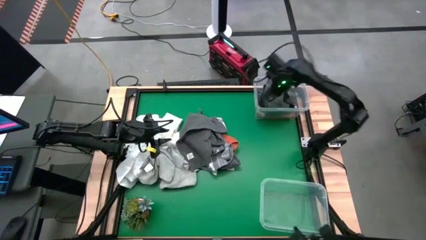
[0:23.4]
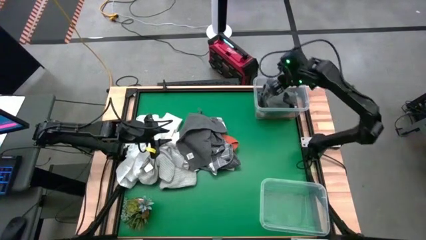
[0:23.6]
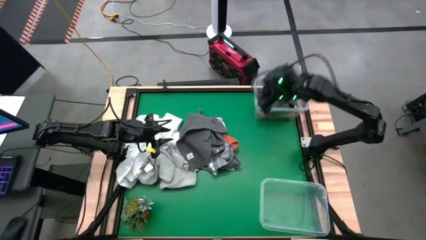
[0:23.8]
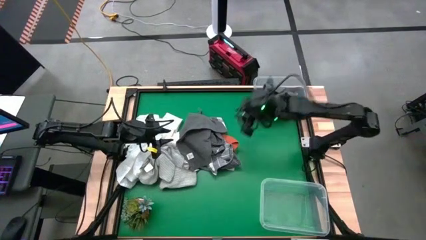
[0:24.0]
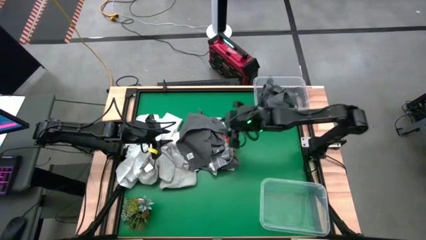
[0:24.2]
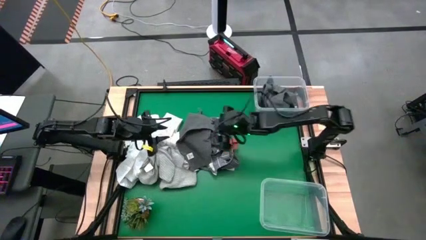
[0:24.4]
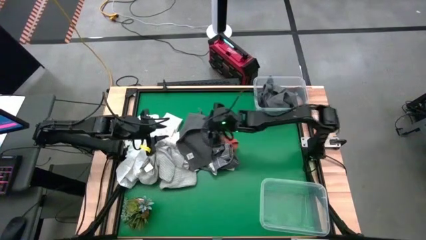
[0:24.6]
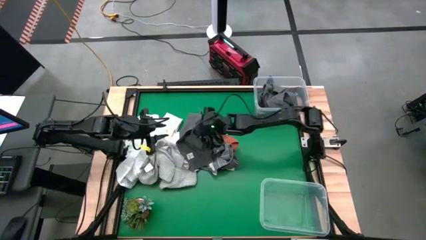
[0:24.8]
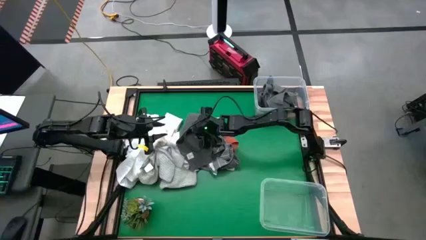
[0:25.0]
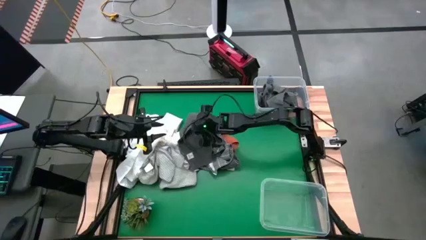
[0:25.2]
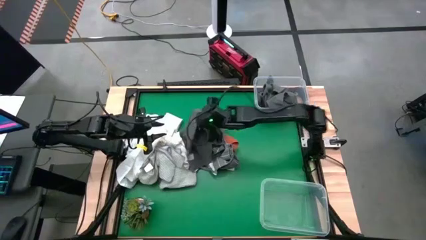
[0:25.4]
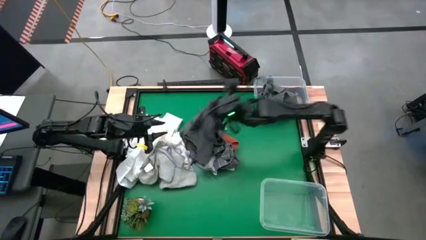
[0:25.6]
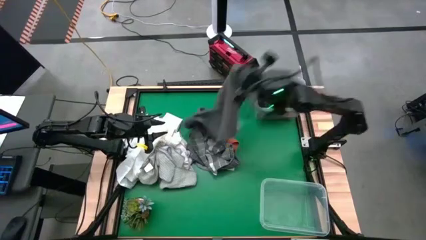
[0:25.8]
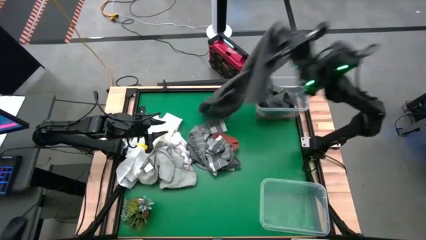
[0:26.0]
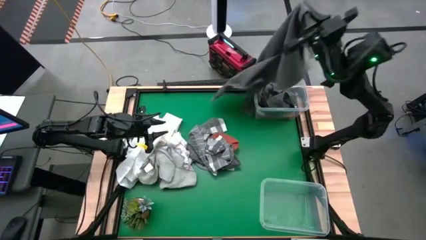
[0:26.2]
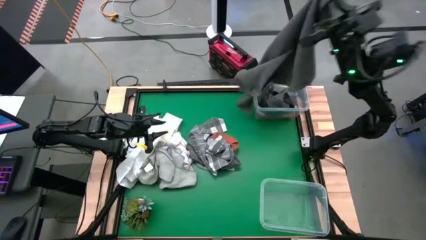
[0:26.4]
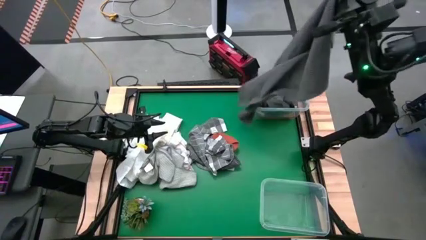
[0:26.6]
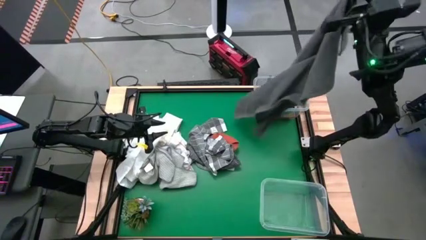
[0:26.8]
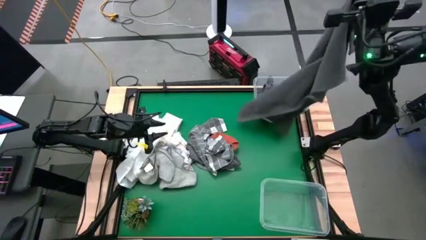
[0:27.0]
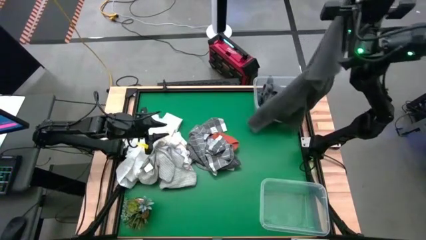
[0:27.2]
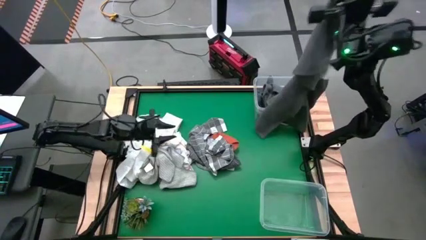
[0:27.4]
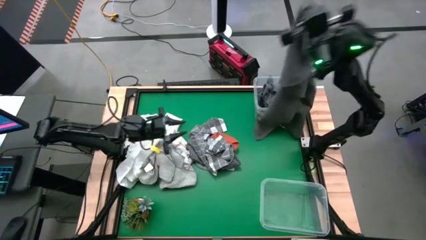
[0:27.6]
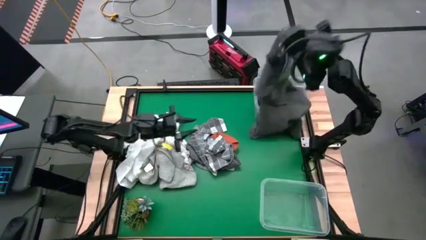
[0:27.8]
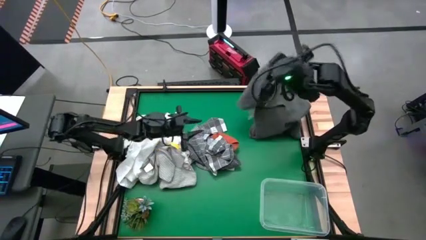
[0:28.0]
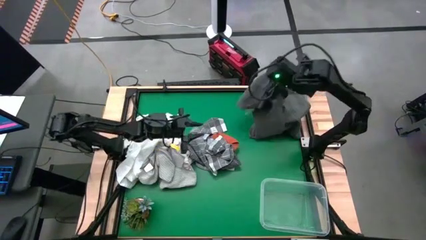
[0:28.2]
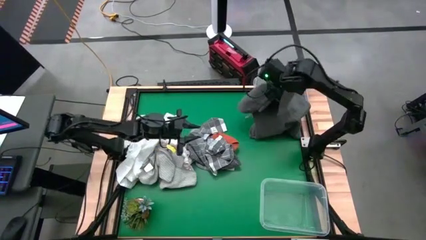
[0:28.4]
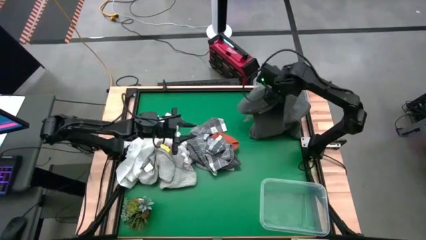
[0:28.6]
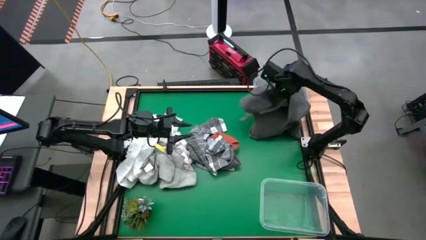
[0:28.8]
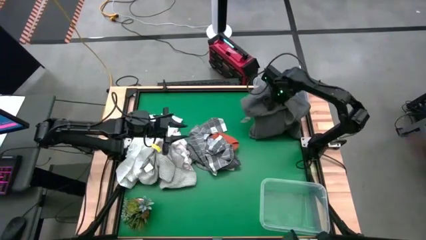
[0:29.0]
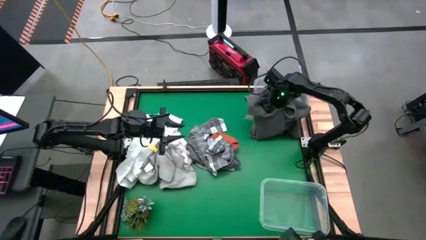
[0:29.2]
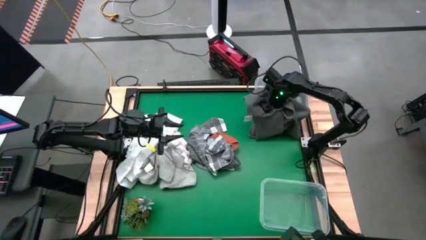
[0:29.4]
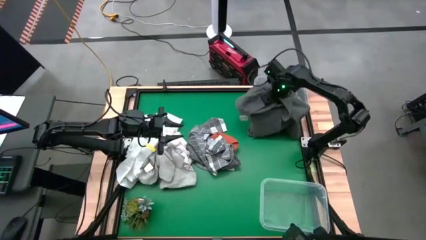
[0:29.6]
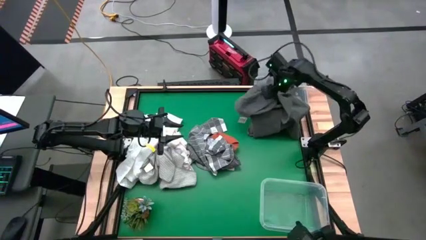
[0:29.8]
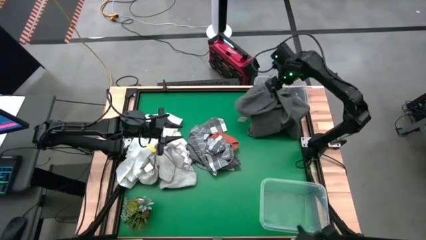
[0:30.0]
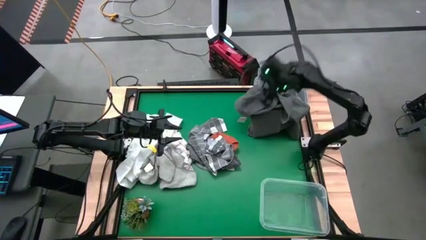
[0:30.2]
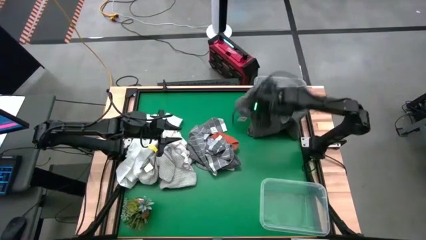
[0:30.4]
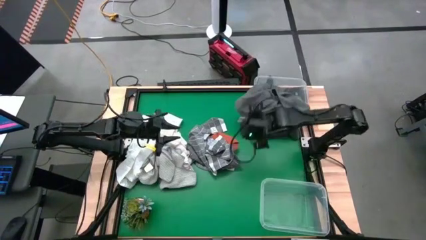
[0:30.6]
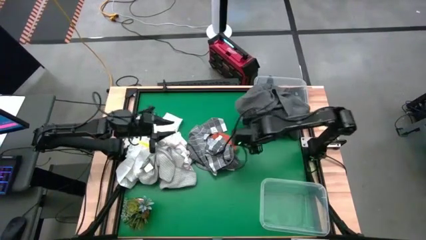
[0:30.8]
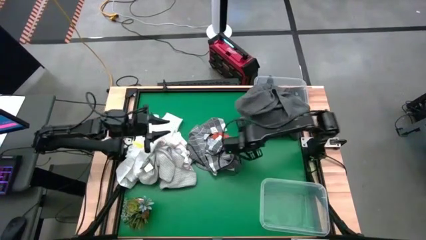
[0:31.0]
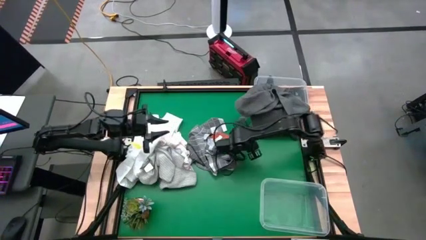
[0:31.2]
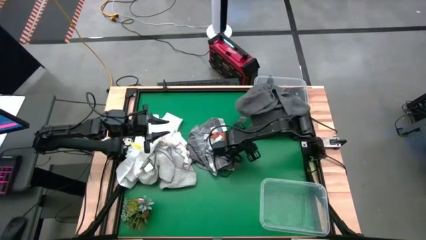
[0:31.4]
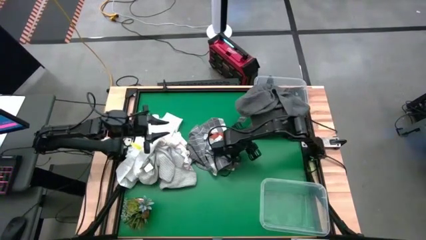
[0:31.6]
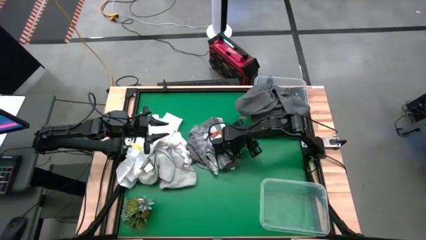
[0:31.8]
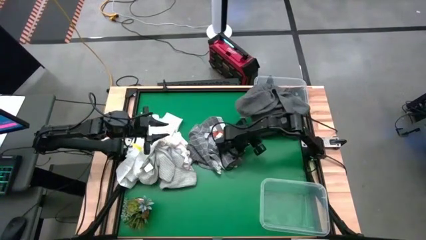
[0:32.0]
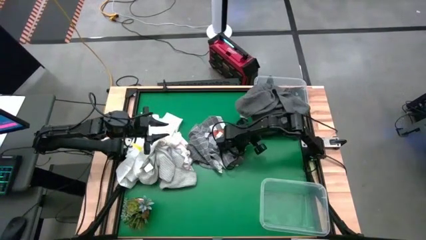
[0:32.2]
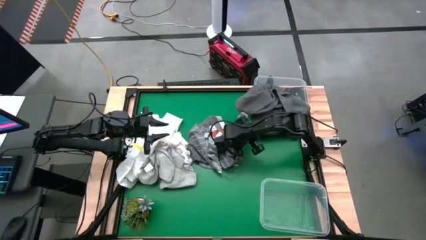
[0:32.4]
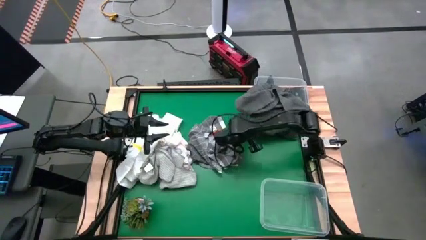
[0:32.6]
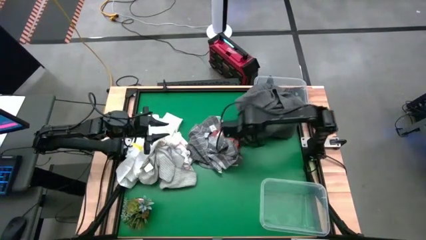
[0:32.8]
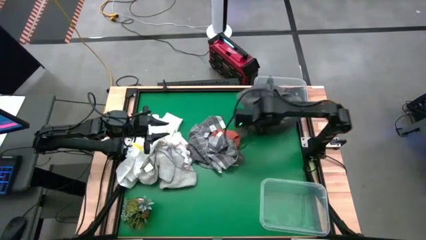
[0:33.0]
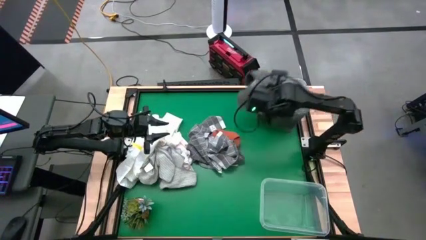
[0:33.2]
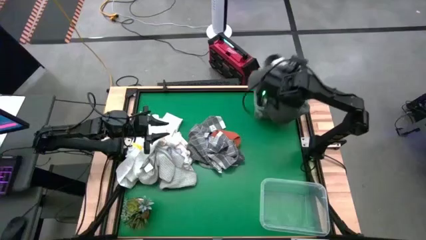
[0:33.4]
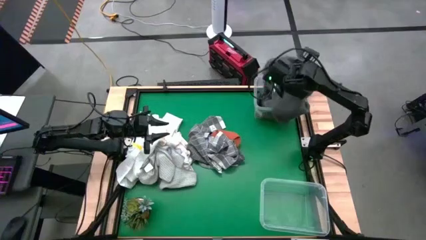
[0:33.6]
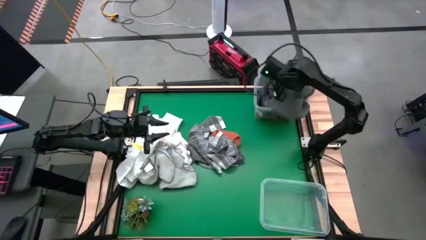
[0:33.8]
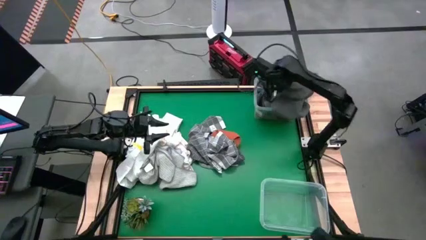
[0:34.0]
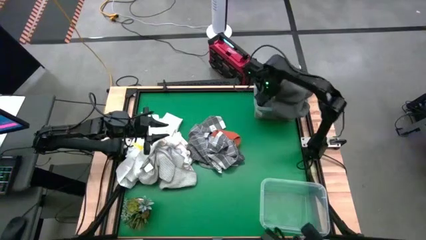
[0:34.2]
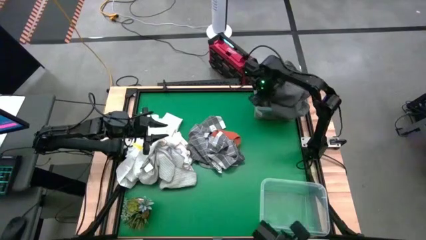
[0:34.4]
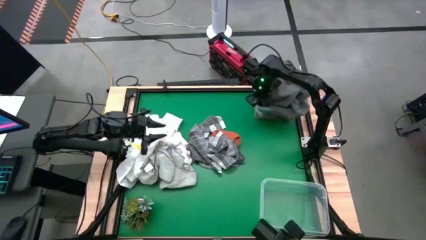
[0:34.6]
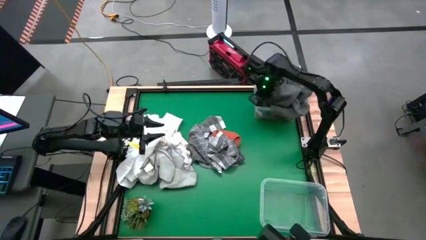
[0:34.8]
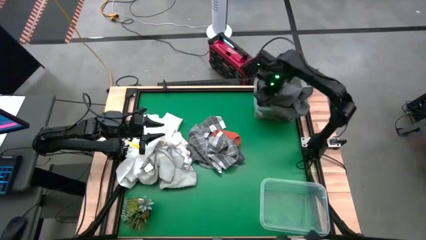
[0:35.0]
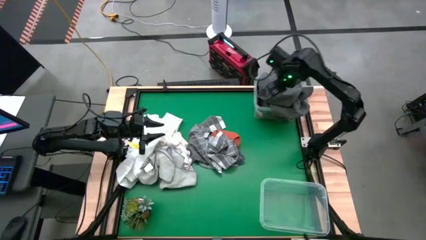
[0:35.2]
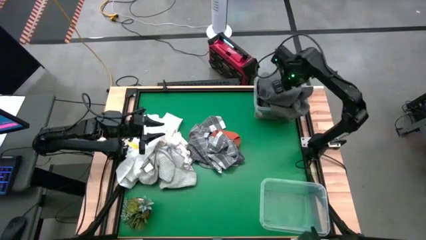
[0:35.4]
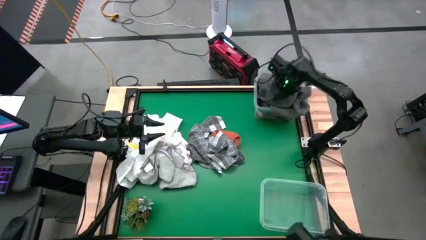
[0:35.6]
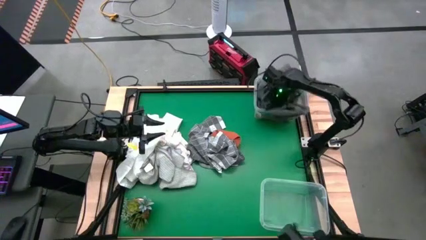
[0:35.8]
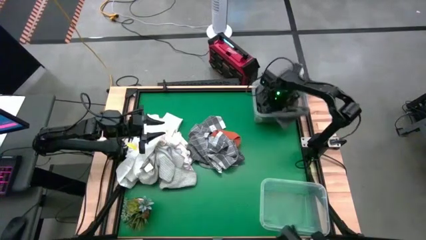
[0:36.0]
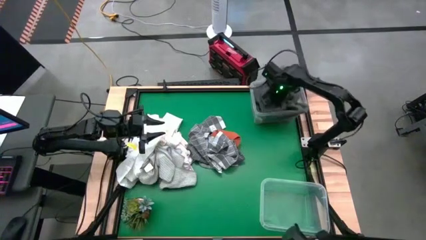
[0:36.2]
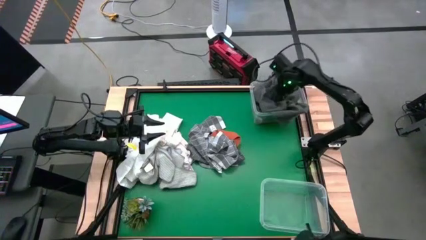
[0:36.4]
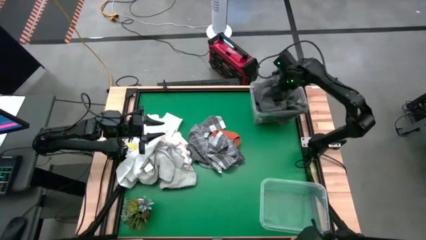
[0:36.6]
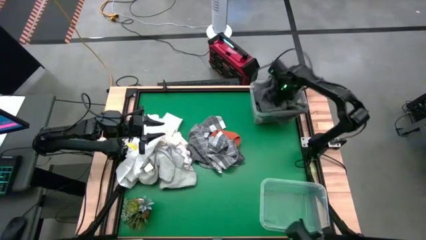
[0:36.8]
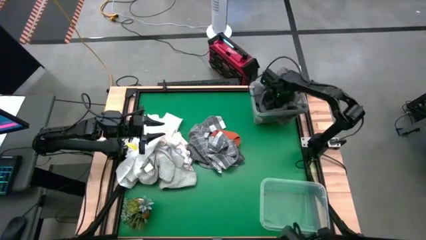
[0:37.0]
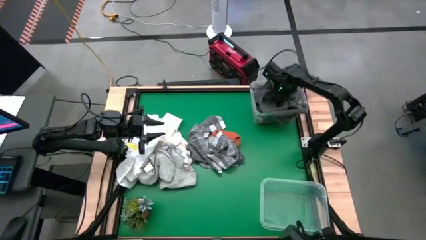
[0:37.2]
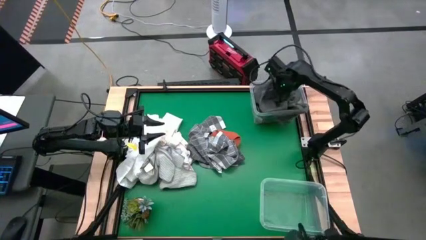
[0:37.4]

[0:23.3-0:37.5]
Task: Sort towels by color in basket
Put the gray towel into the top transparent bin
